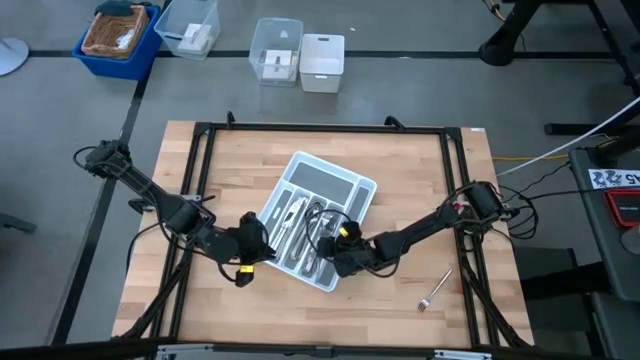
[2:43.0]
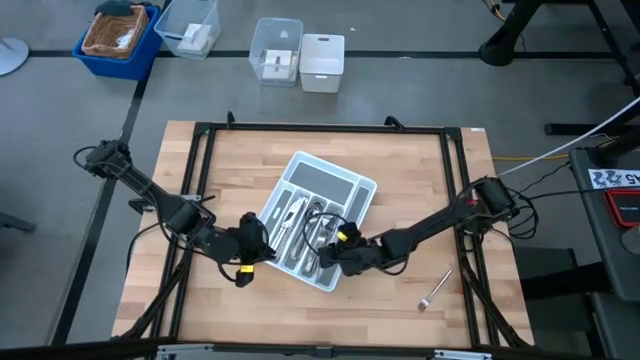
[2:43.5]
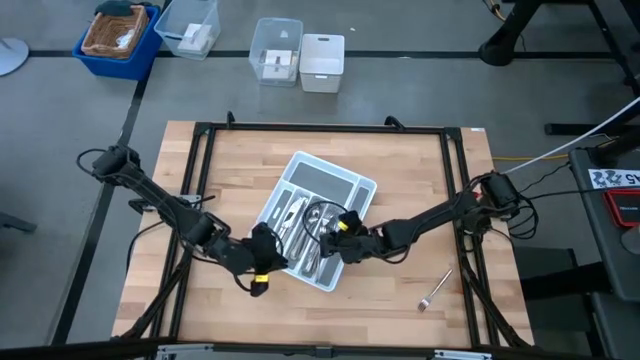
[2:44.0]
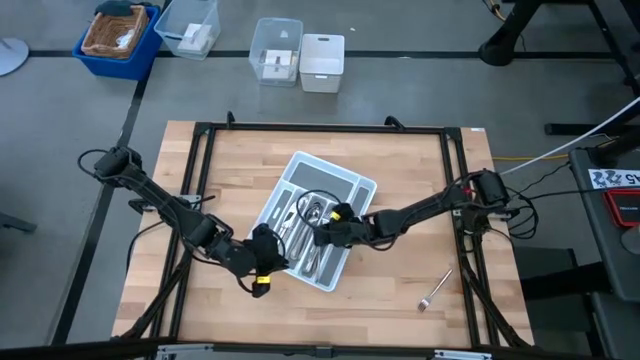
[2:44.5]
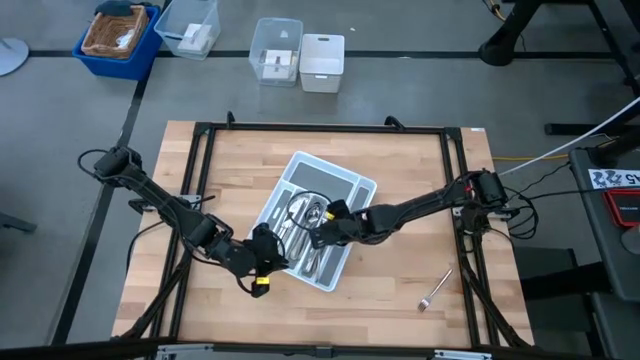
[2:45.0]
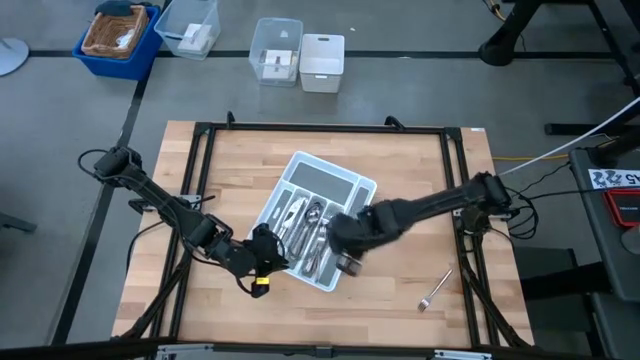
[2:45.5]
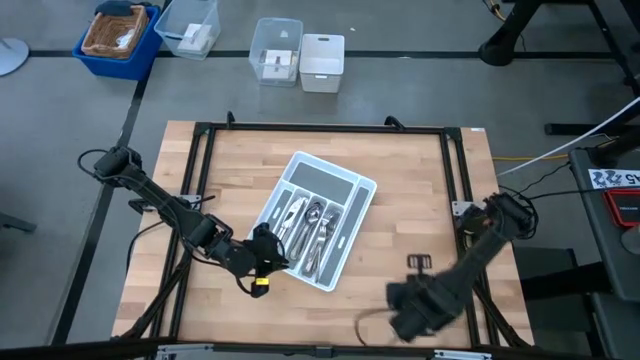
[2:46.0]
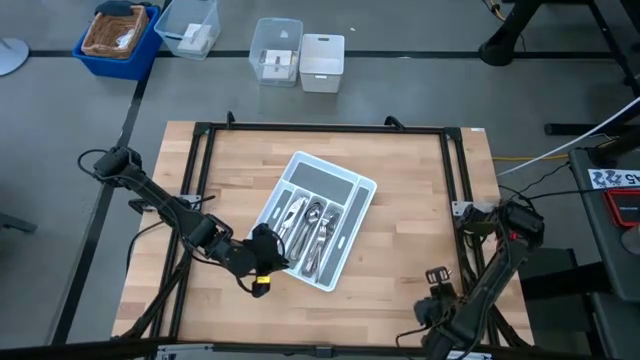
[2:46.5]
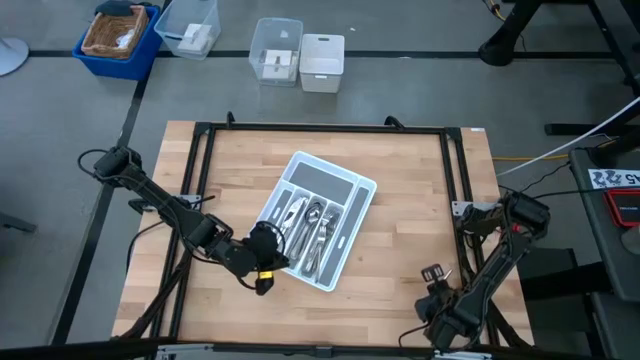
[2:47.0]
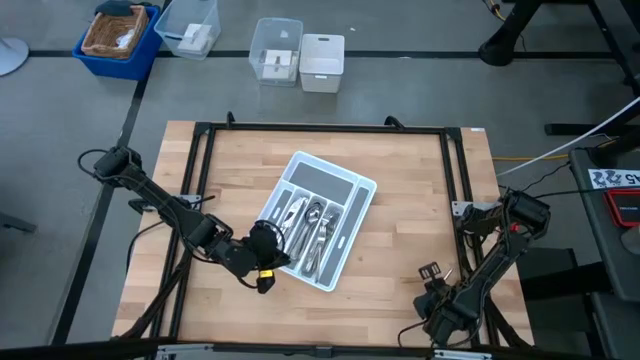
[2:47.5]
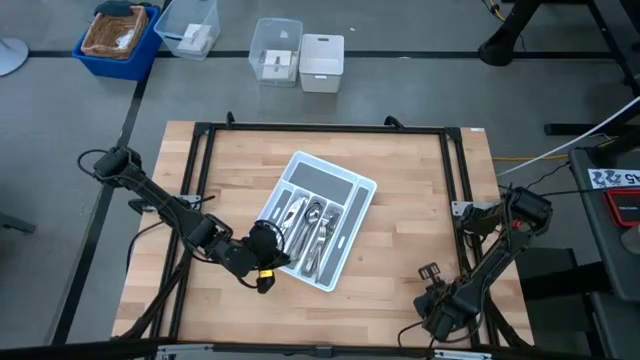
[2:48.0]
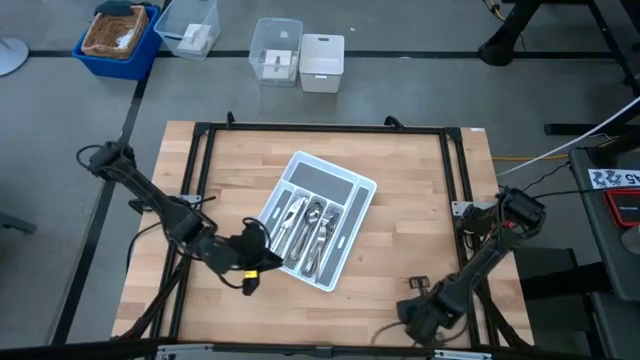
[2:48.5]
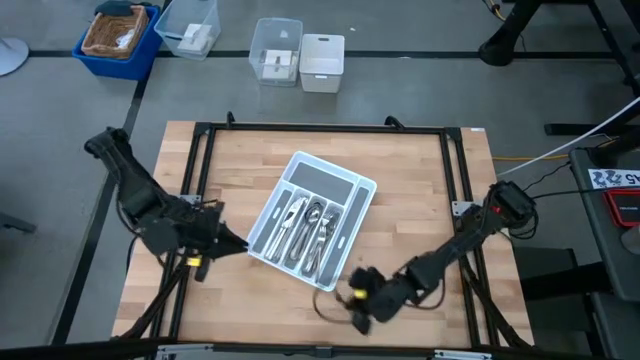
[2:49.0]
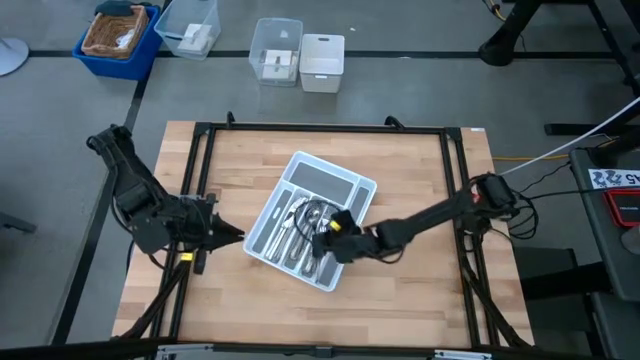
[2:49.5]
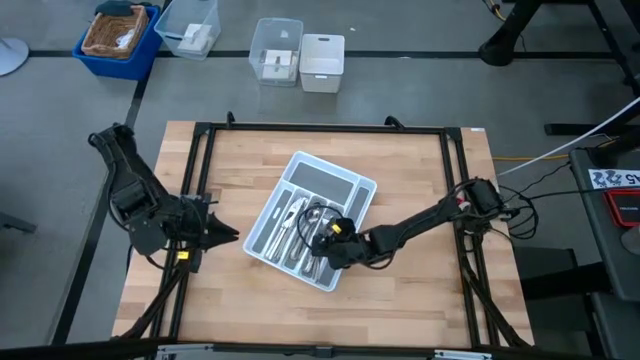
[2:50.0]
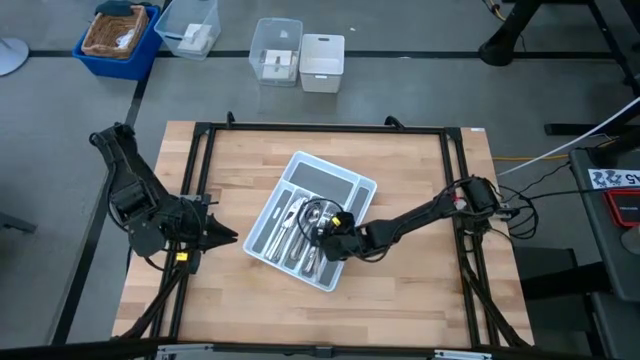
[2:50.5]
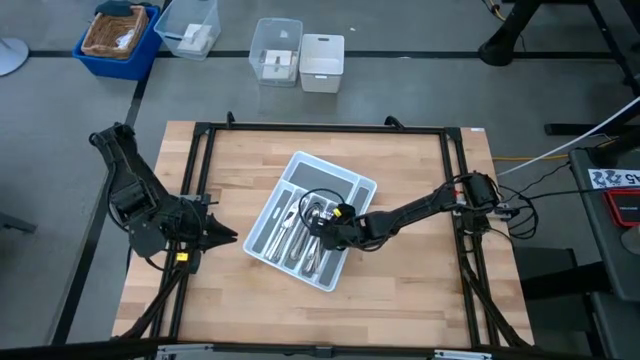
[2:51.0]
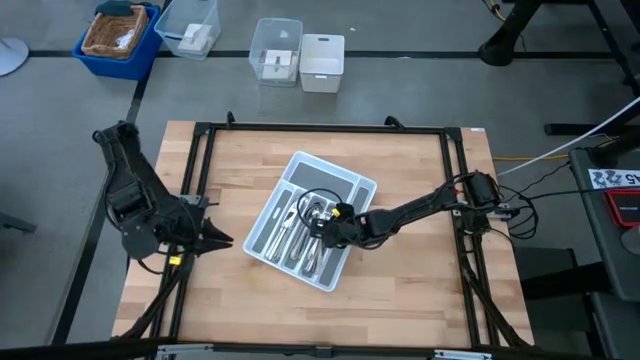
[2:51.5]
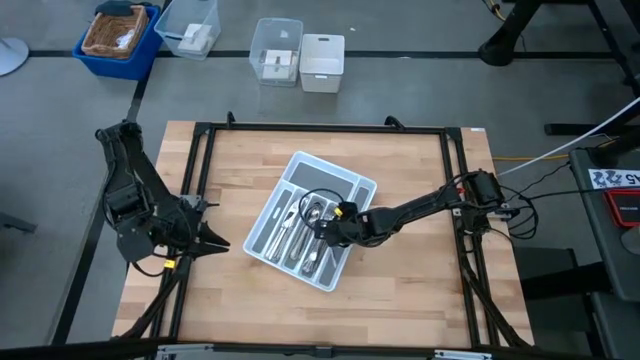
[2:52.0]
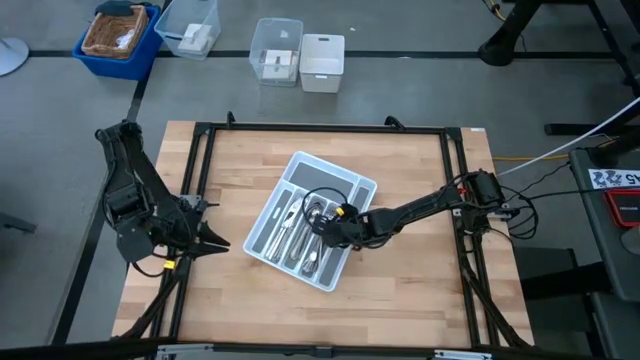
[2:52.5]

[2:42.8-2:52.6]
Task: Sort silverware
Put the silver fork into the white cutlery tray

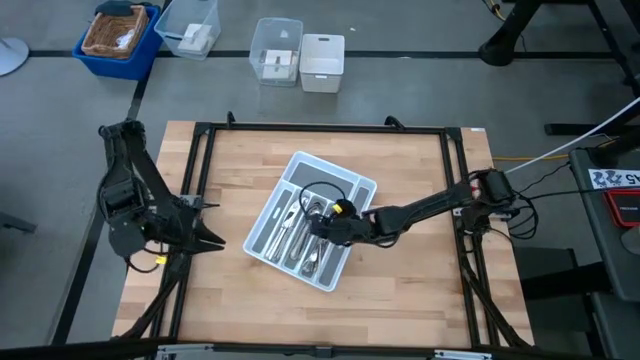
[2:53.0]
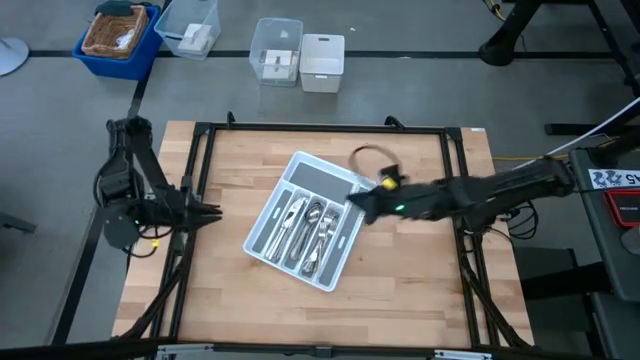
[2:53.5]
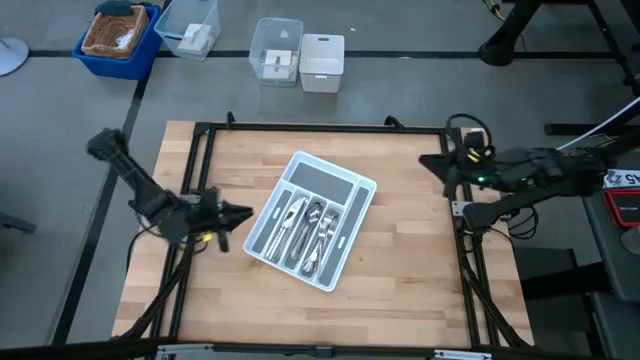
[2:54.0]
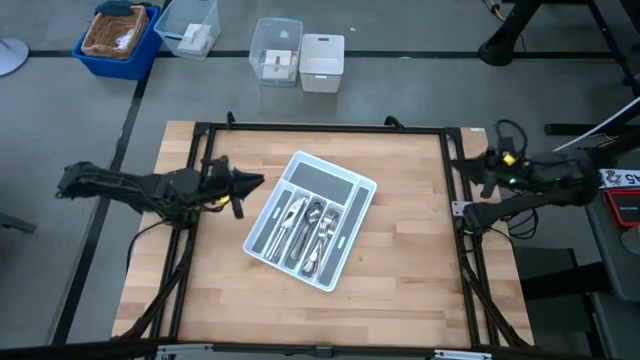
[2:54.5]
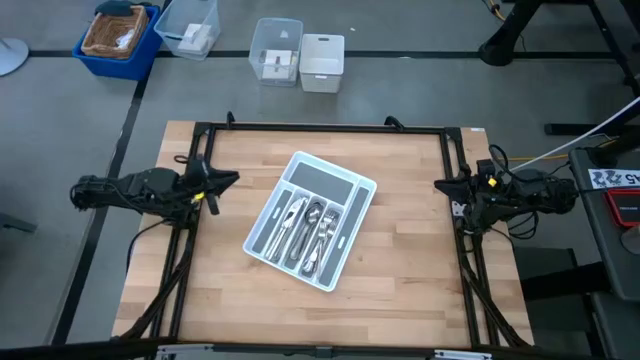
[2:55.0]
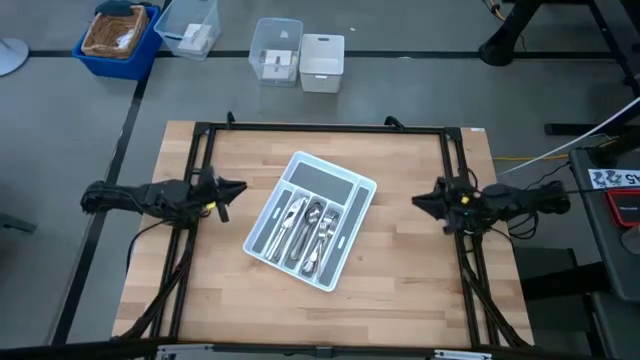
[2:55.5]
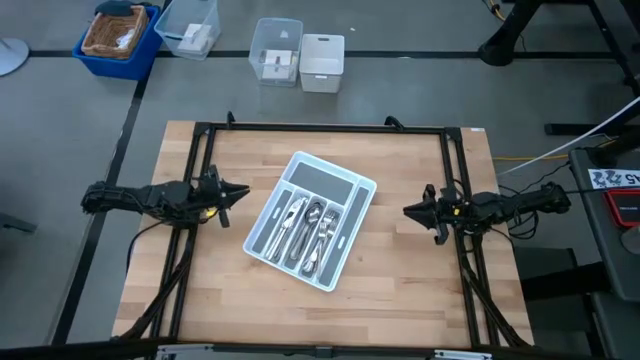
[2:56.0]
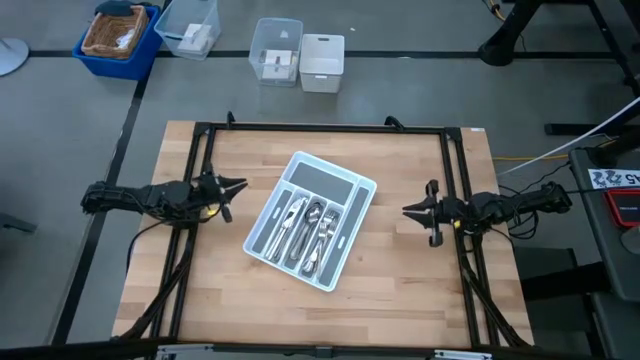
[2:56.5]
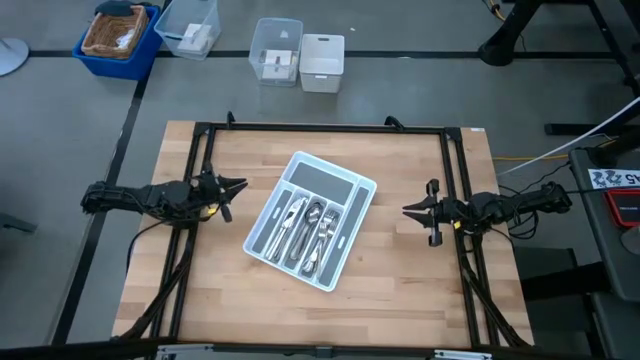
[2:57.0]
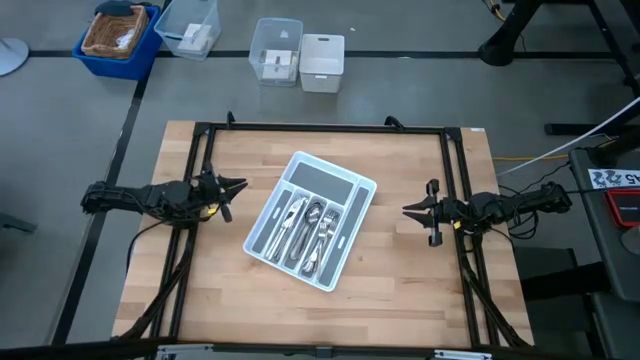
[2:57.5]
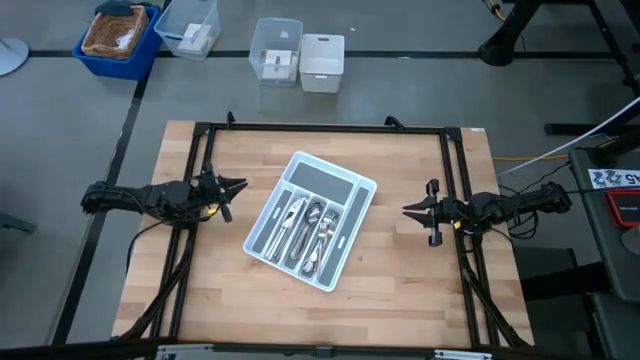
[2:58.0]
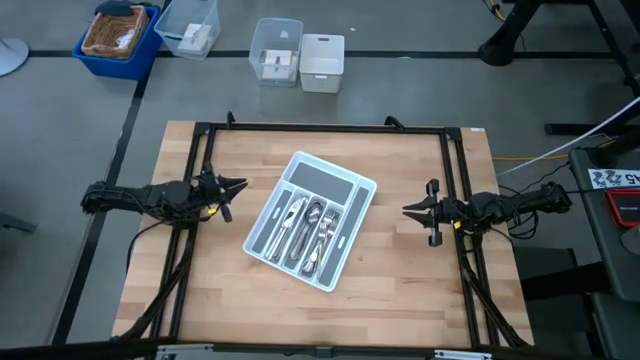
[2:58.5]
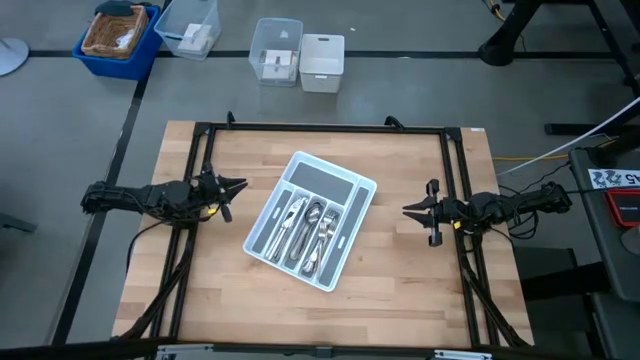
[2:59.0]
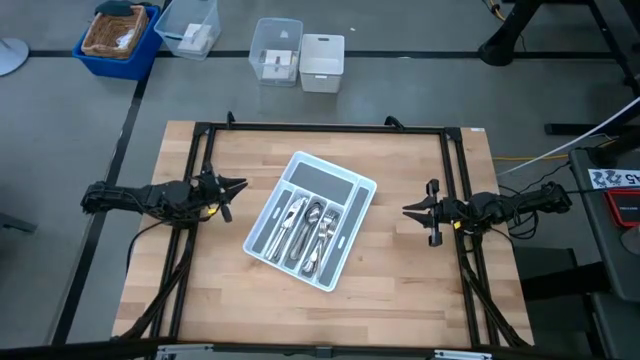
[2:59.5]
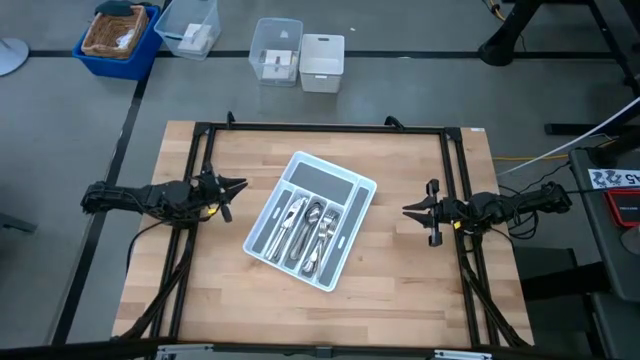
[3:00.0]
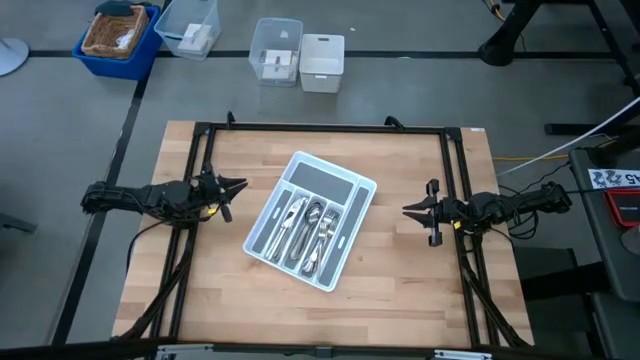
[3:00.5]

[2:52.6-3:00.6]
Return to Home Position
